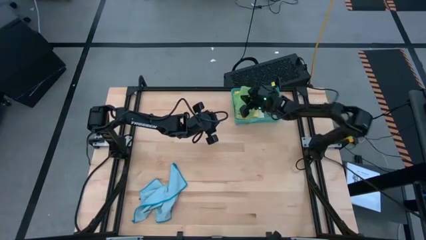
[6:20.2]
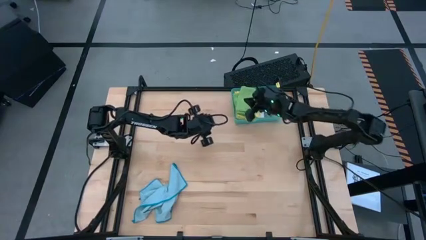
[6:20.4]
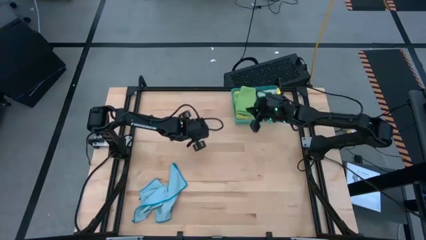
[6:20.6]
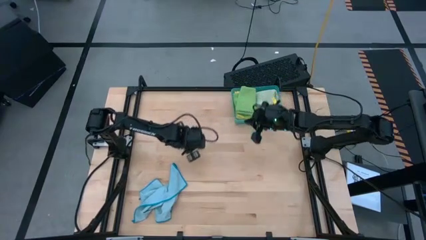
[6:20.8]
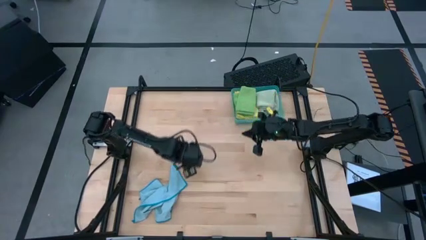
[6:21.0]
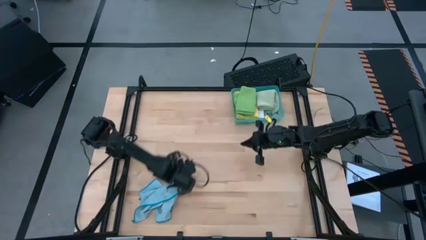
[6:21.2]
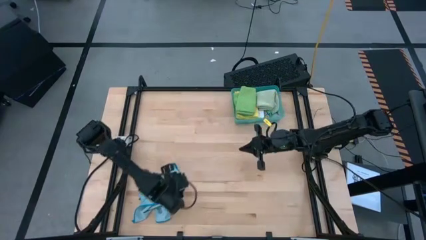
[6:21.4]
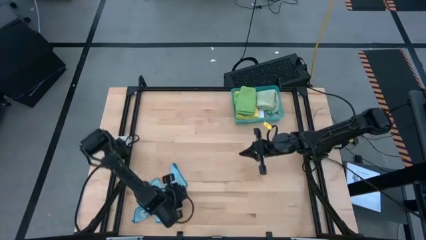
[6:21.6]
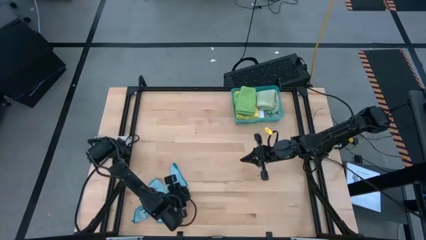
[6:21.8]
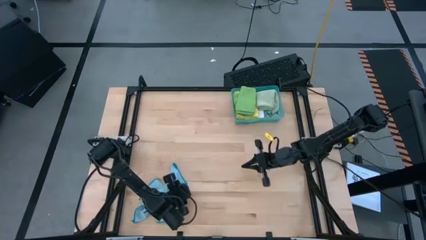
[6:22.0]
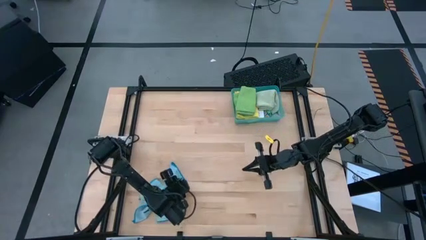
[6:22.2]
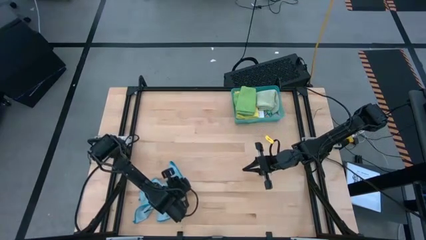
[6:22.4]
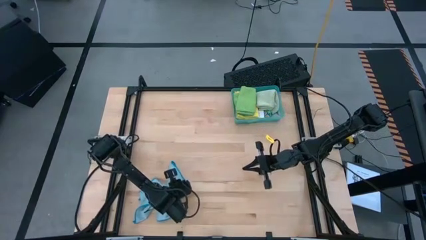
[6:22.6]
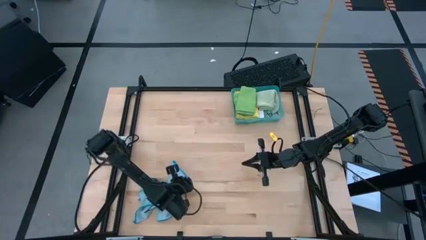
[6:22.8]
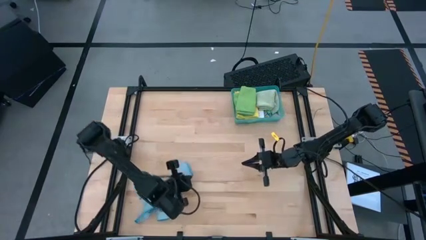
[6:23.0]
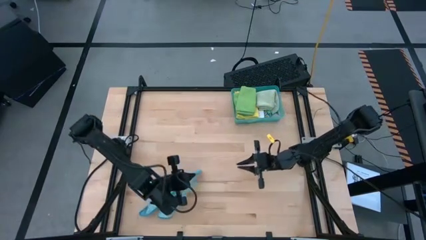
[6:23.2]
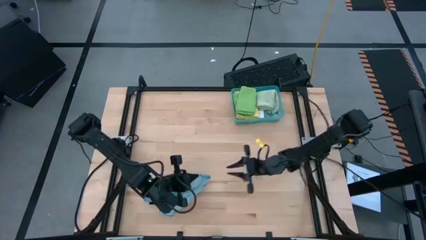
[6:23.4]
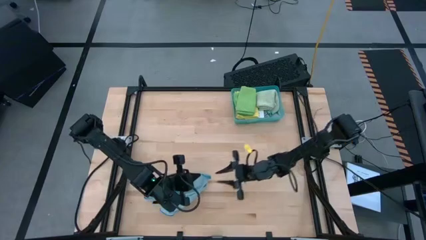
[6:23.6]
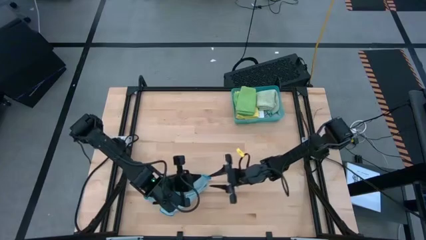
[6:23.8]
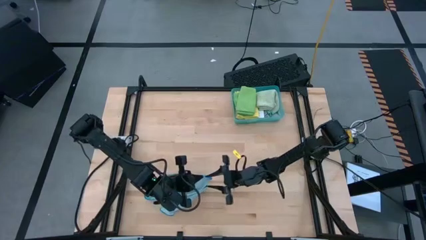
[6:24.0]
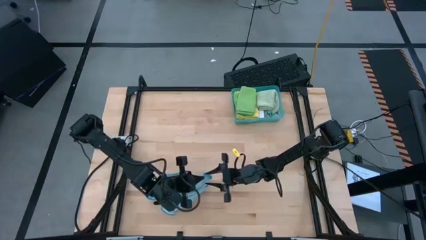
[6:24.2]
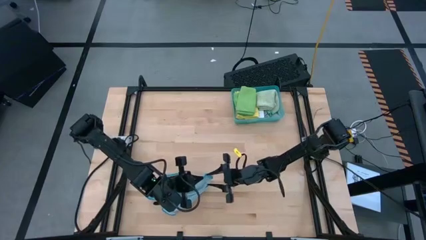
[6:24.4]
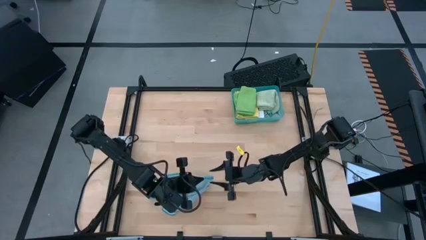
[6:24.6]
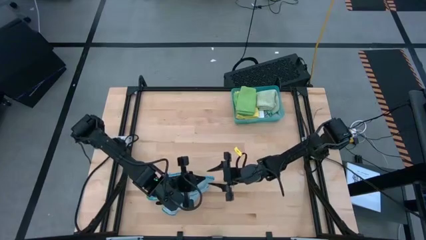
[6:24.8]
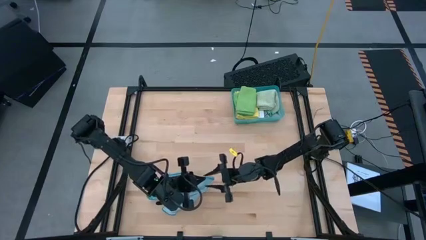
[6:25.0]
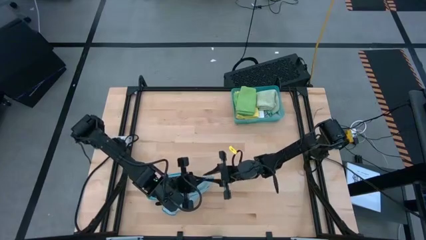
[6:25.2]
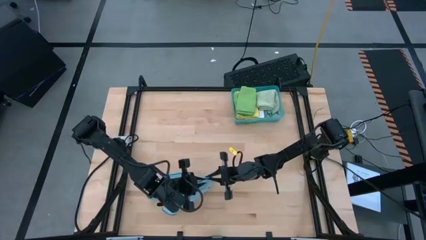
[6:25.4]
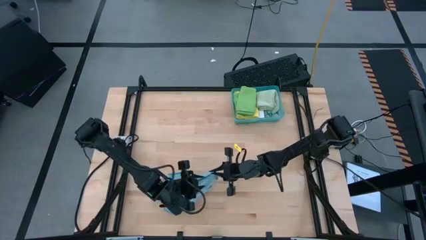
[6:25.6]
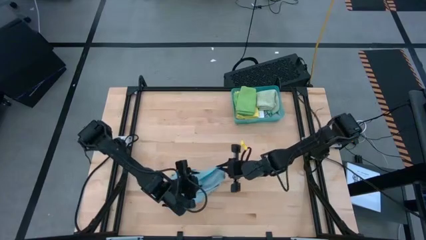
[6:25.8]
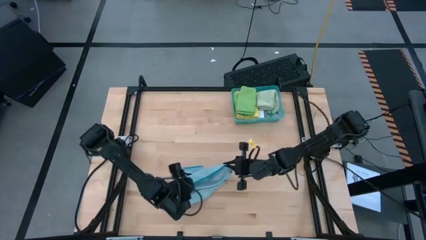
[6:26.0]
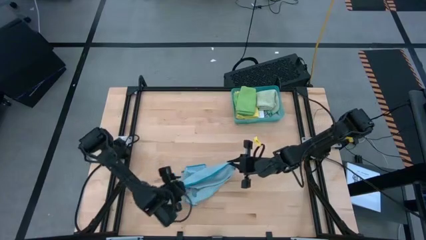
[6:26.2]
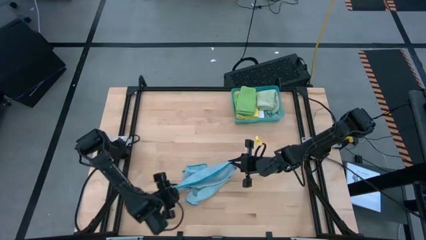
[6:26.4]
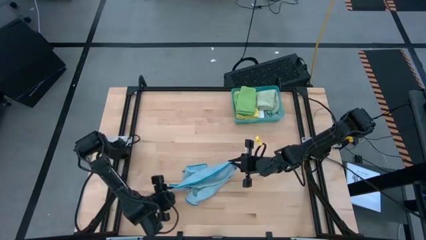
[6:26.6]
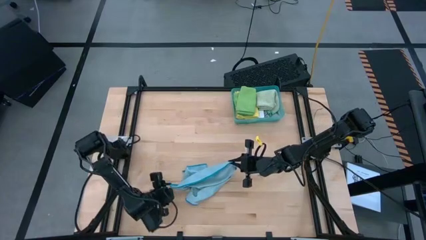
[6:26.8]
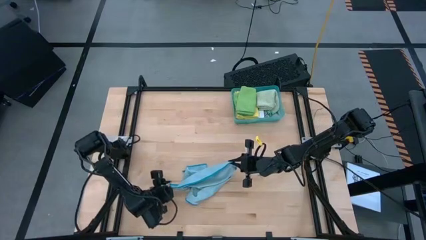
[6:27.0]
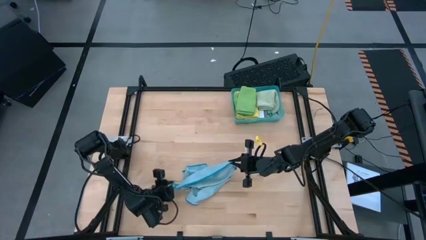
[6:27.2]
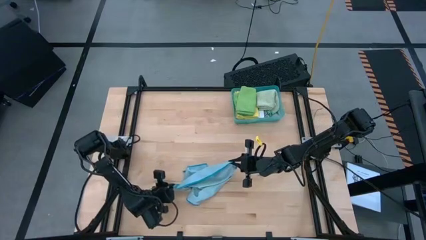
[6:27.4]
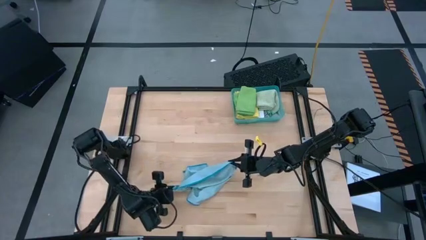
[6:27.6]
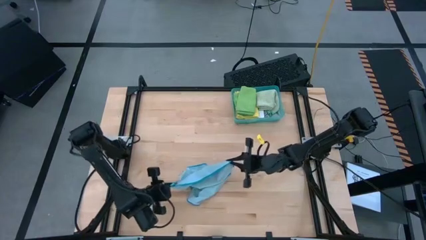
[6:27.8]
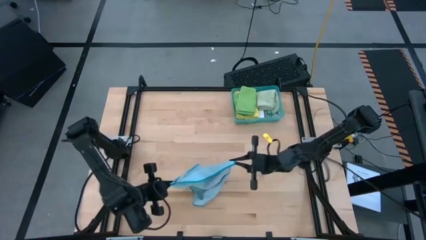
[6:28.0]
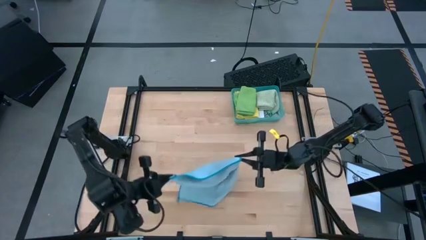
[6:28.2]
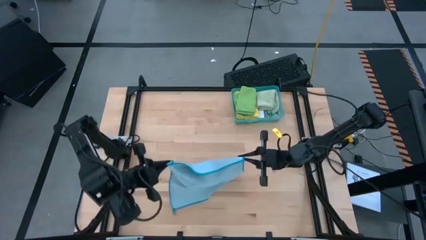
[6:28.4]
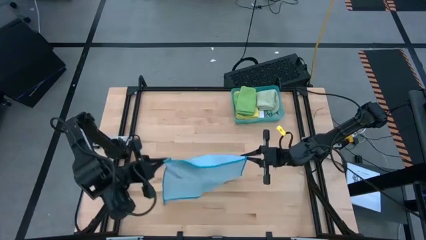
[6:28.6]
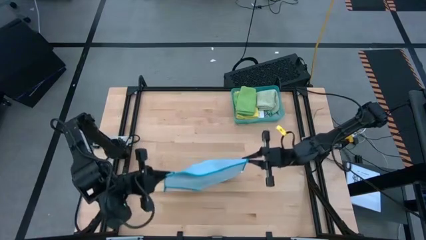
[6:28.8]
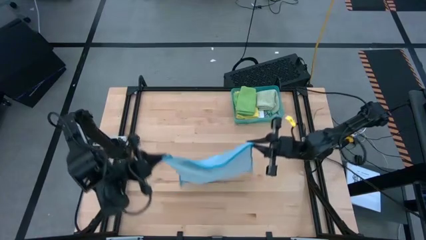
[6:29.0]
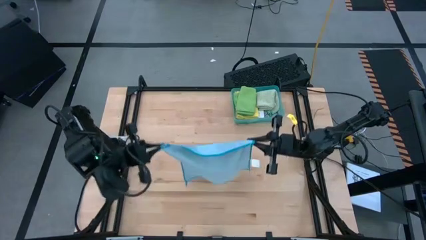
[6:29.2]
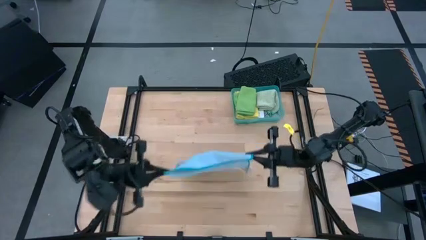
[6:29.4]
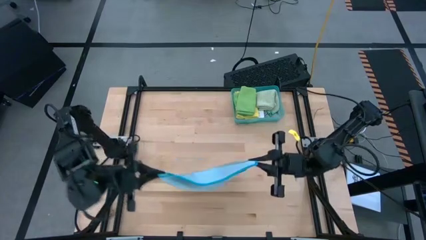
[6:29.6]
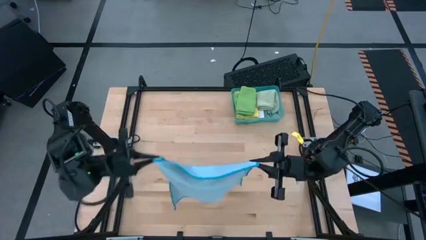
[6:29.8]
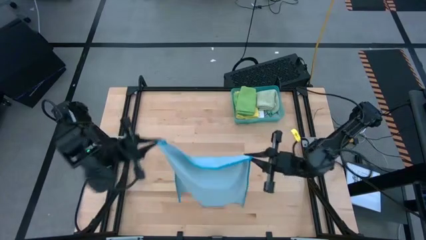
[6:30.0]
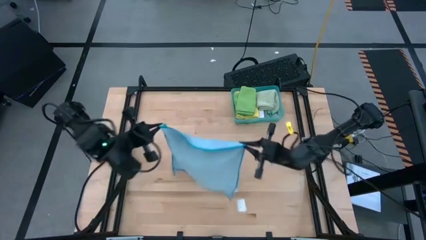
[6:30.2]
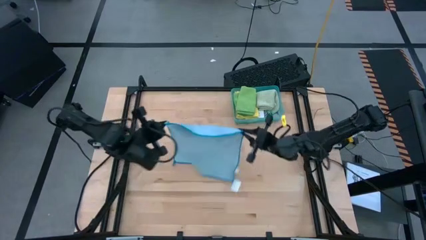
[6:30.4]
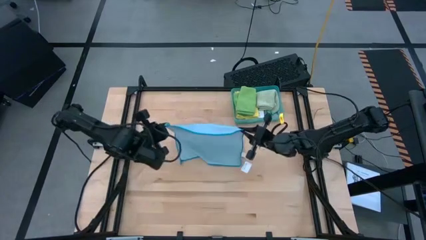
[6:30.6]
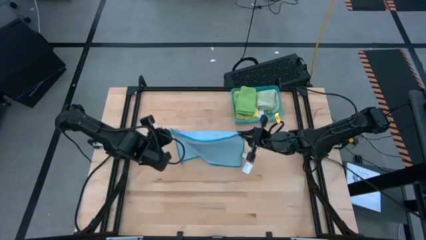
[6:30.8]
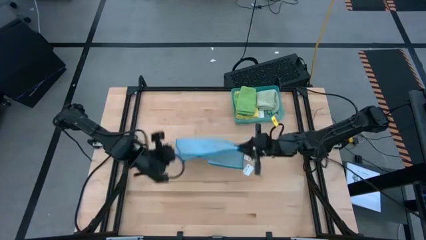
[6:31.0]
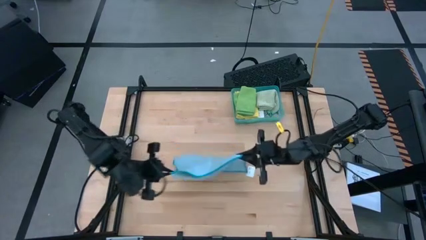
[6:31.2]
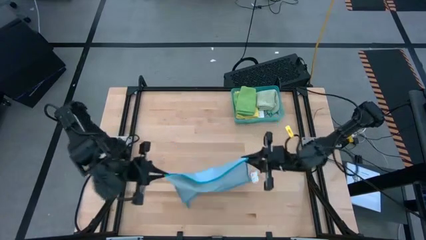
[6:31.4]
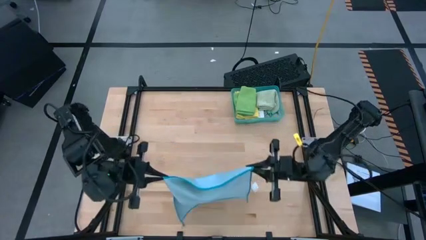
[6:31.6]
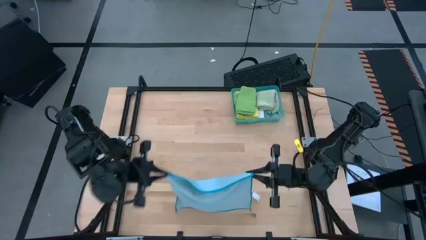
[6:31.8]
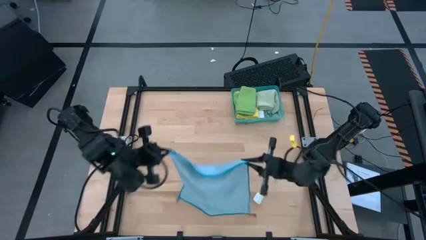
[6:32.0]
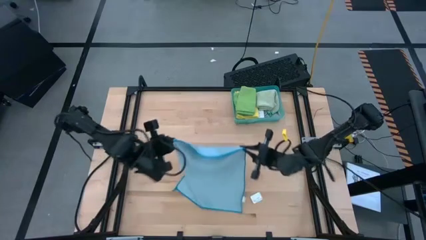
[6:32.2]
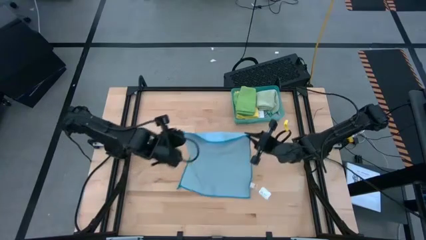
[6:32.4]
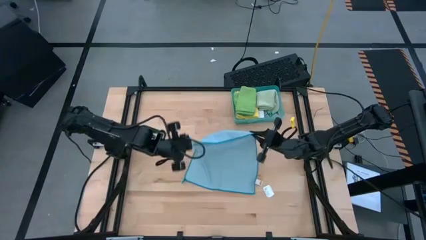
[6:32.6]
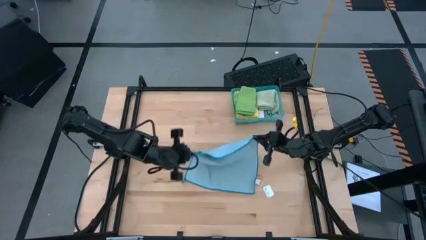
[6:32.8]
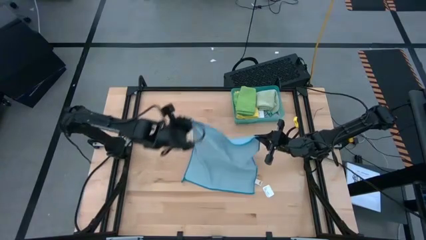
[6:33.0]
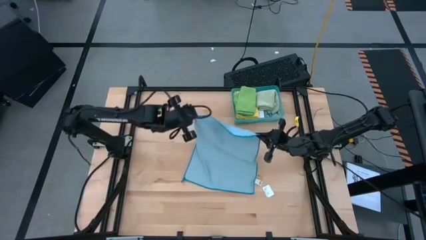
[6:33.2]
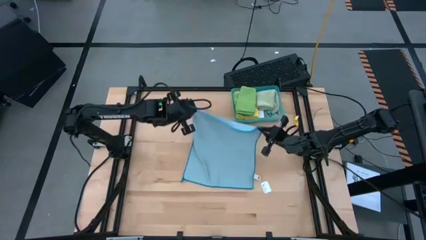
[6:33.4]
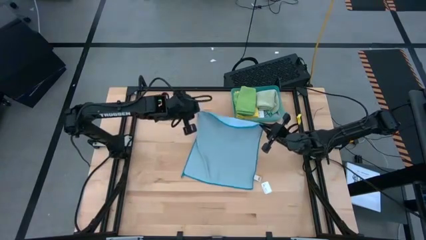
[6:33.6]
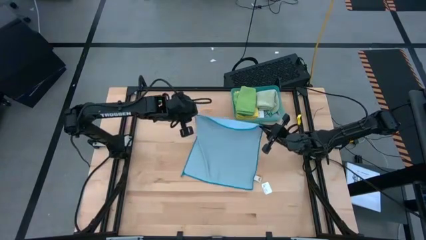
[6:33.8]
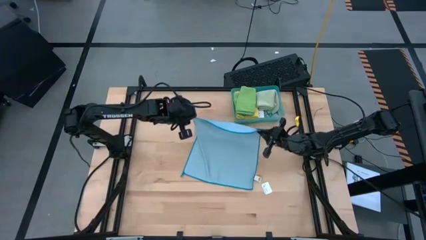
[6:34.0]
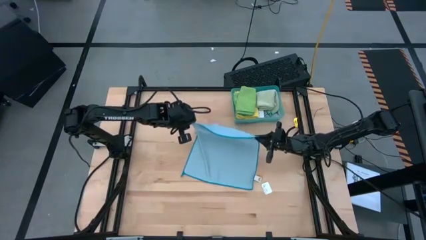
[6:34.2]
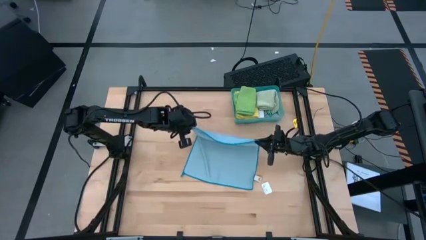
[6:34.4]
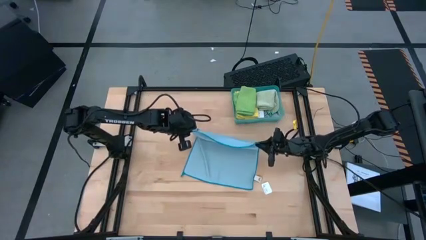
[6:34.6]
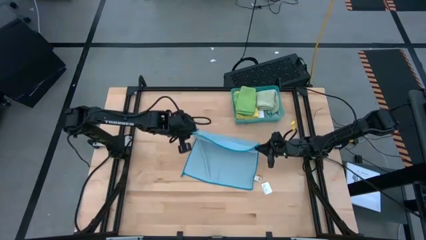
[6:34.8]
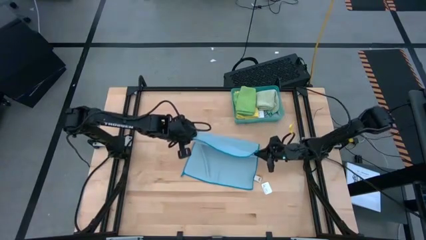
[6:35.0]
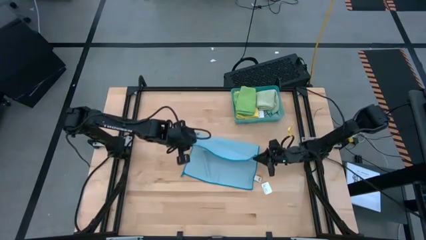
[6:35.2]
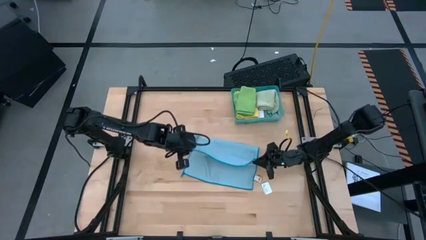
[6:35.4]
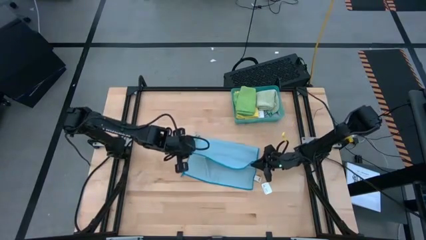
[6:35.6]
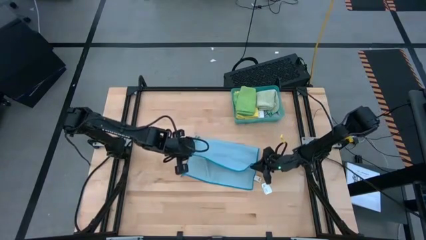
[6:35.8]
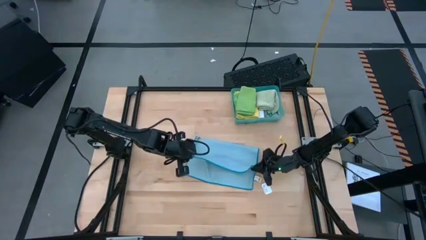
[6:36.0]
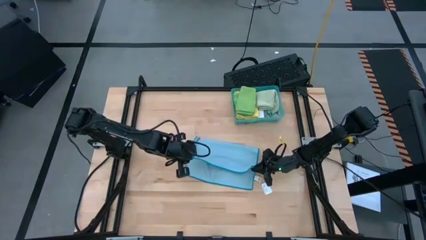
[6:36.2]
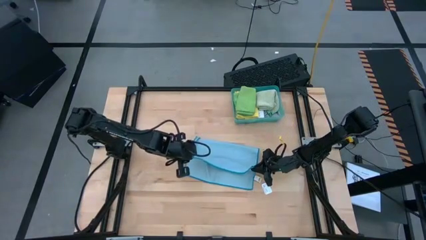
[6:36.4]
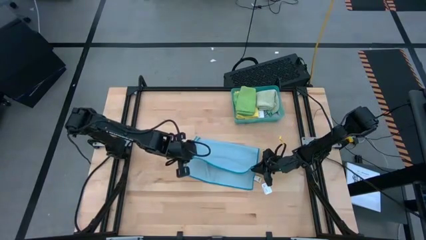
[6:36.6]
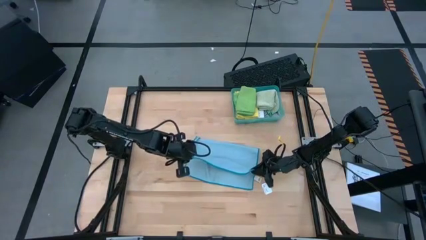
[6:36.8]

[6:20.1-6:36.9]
Task: Fold microfiber towels
Fold the blue microfiber cloth
